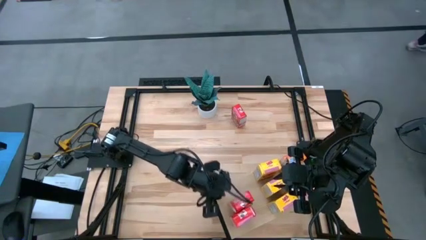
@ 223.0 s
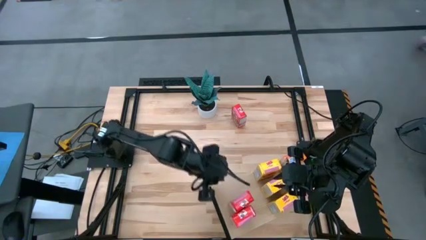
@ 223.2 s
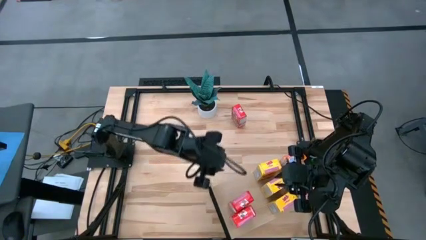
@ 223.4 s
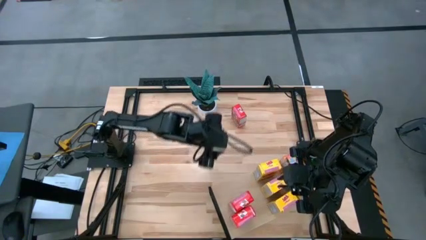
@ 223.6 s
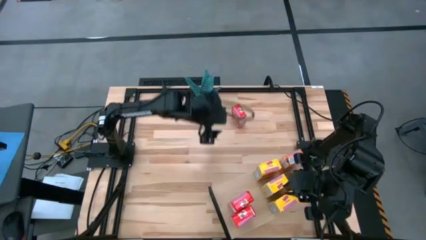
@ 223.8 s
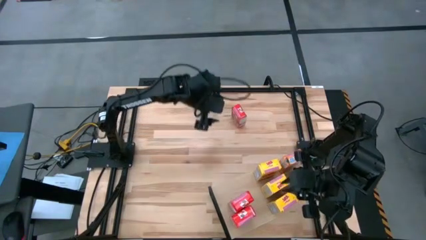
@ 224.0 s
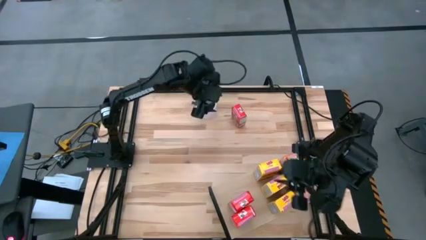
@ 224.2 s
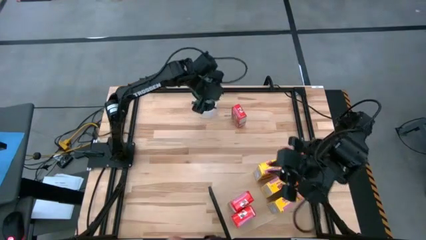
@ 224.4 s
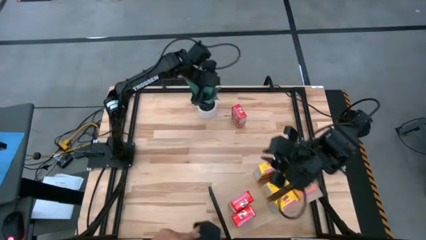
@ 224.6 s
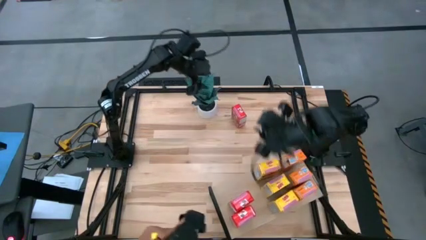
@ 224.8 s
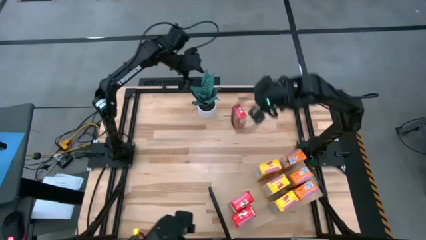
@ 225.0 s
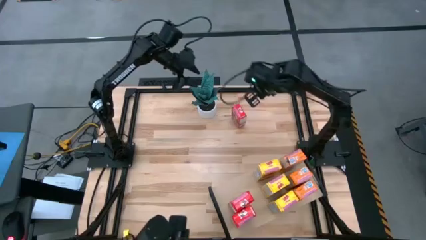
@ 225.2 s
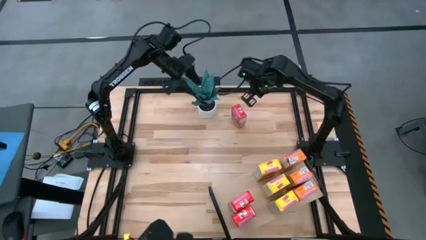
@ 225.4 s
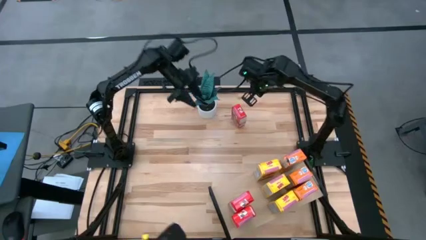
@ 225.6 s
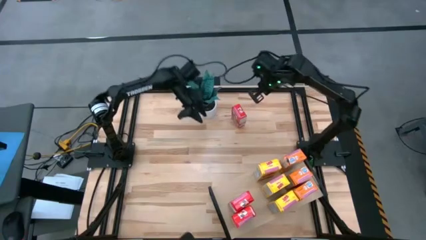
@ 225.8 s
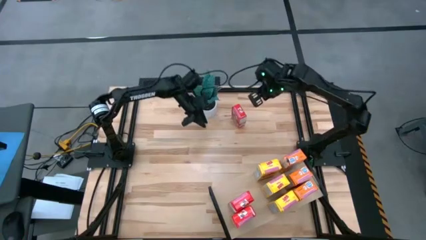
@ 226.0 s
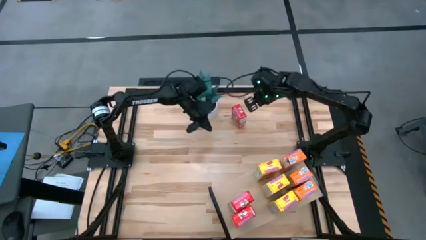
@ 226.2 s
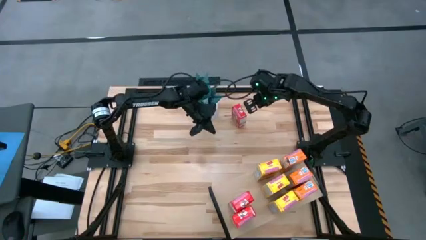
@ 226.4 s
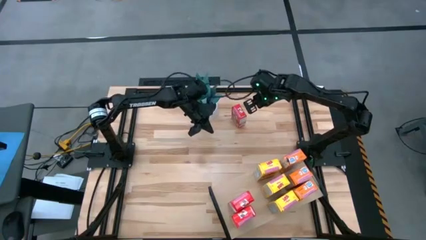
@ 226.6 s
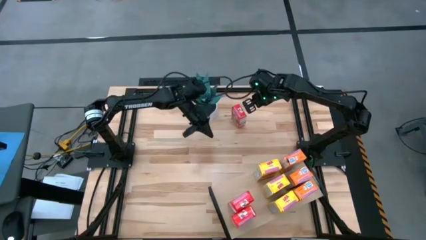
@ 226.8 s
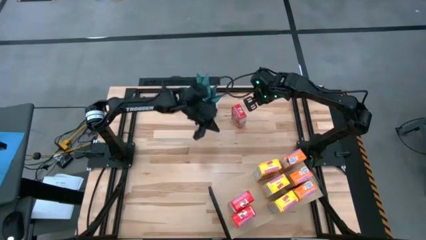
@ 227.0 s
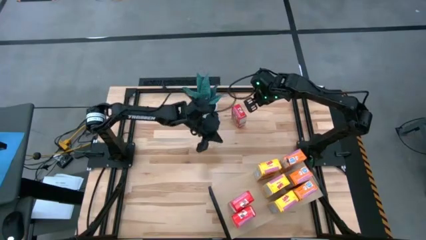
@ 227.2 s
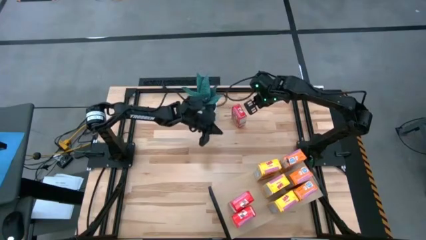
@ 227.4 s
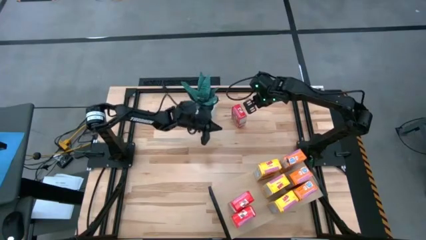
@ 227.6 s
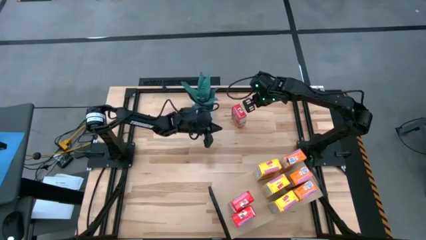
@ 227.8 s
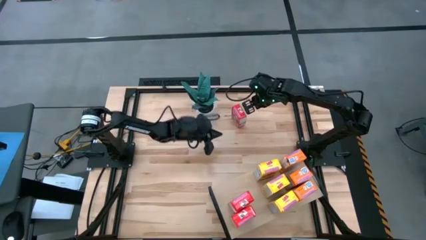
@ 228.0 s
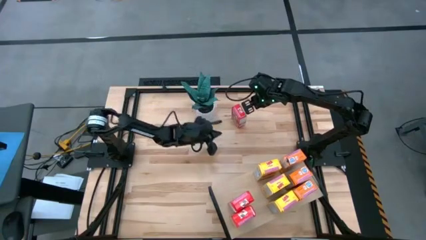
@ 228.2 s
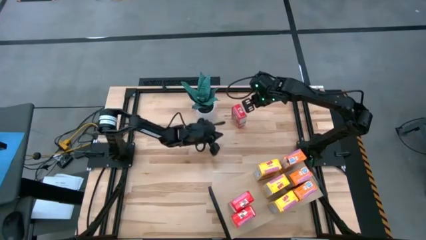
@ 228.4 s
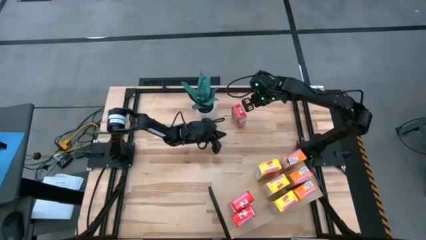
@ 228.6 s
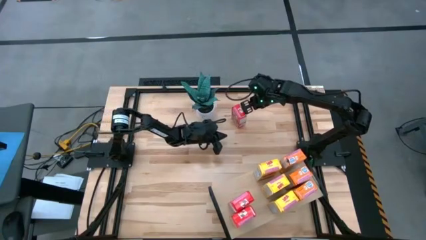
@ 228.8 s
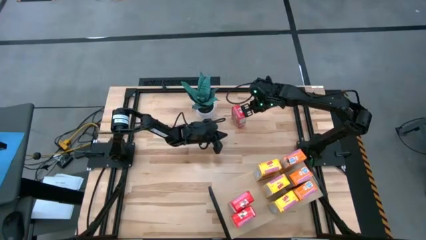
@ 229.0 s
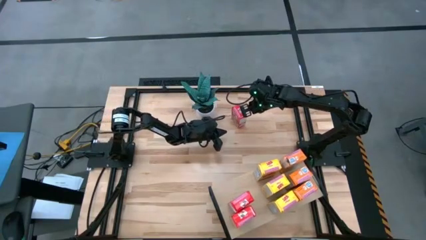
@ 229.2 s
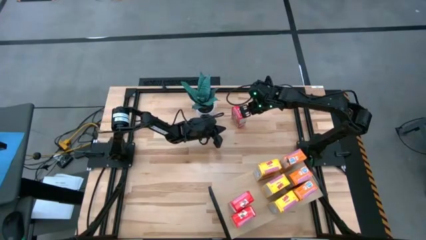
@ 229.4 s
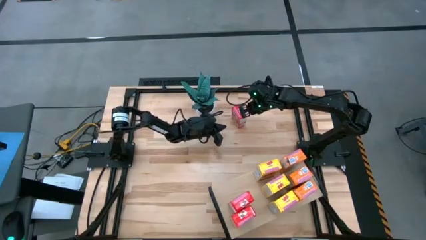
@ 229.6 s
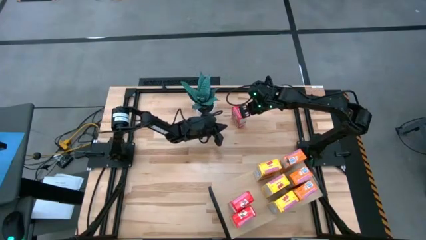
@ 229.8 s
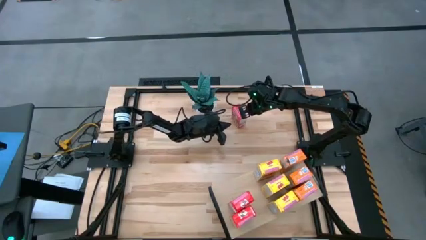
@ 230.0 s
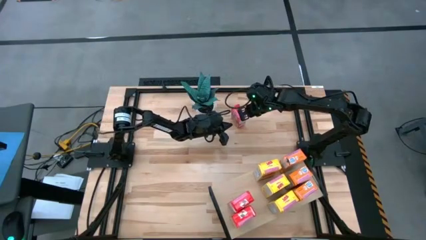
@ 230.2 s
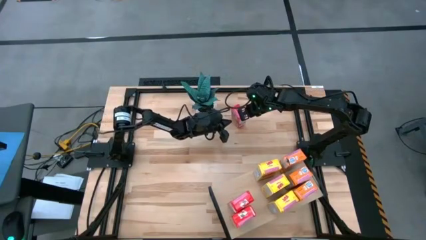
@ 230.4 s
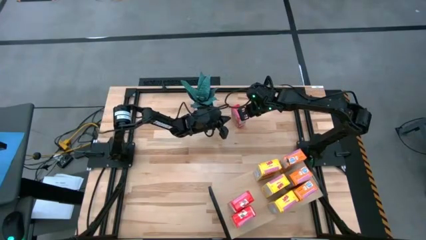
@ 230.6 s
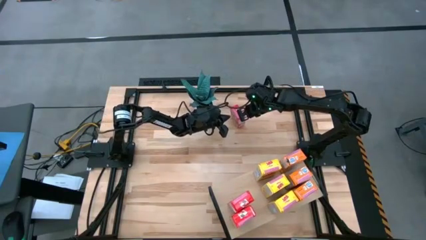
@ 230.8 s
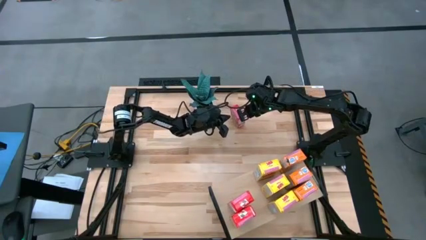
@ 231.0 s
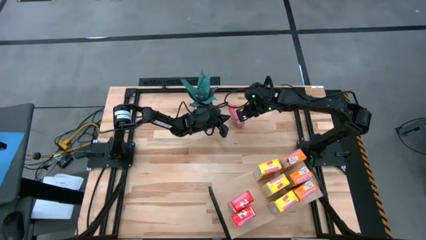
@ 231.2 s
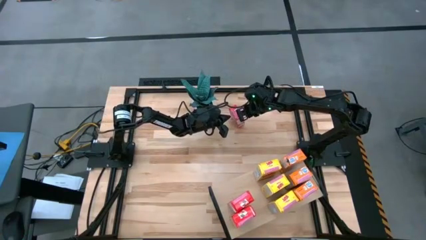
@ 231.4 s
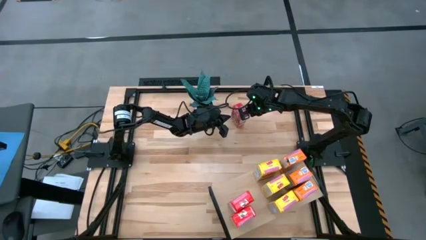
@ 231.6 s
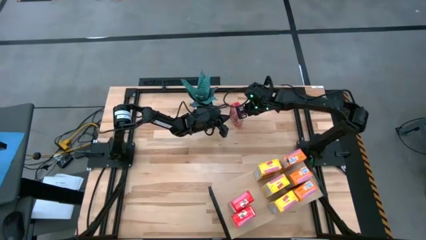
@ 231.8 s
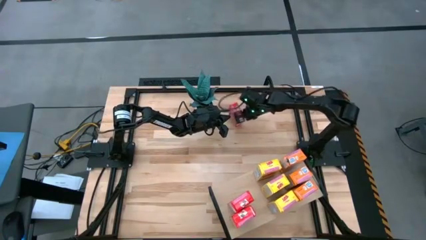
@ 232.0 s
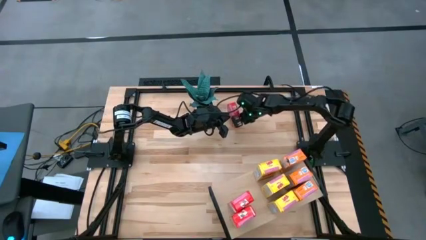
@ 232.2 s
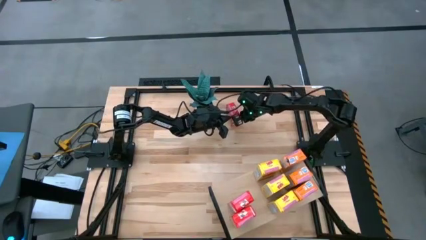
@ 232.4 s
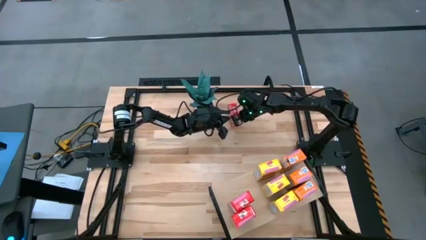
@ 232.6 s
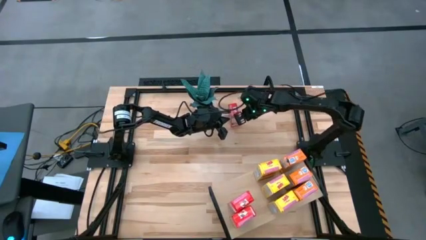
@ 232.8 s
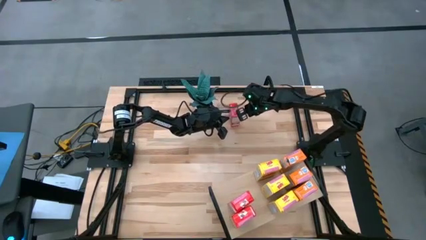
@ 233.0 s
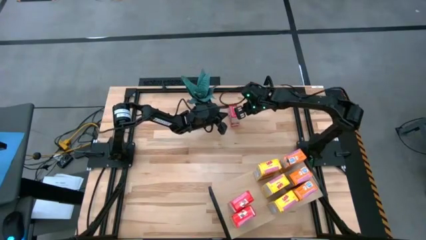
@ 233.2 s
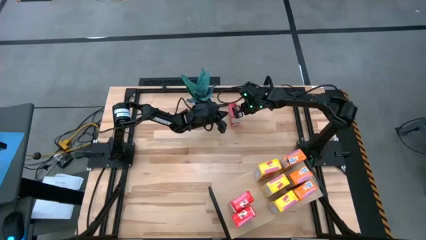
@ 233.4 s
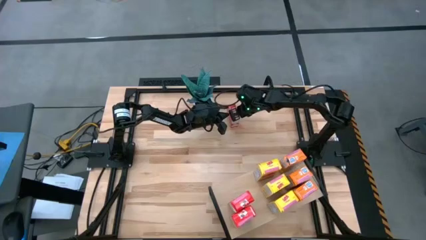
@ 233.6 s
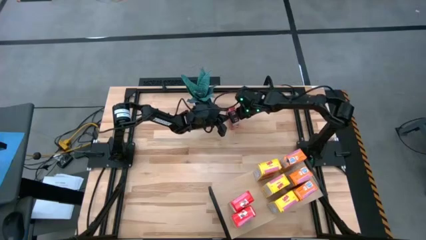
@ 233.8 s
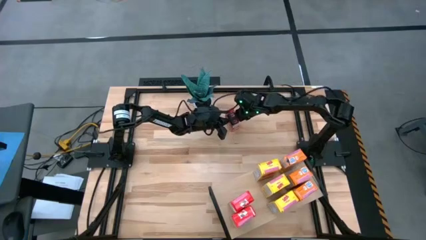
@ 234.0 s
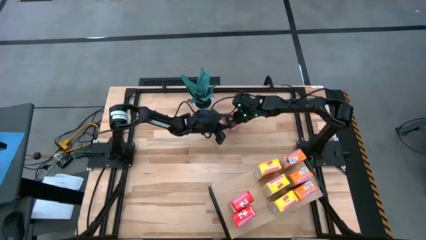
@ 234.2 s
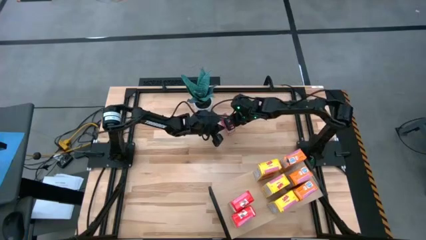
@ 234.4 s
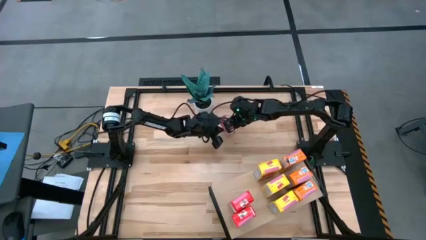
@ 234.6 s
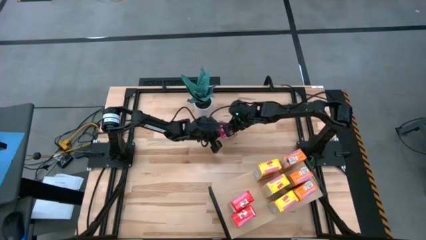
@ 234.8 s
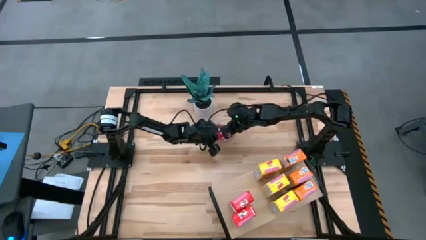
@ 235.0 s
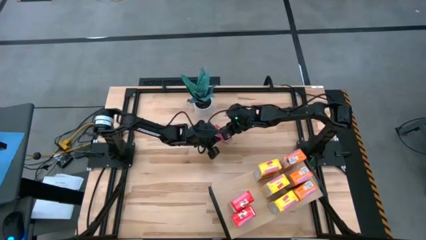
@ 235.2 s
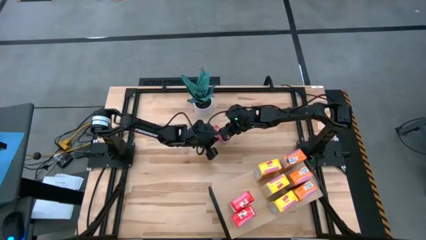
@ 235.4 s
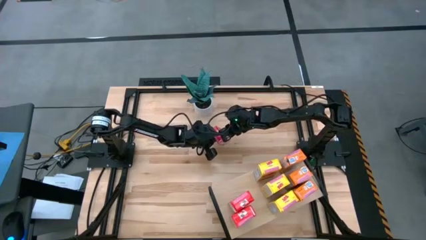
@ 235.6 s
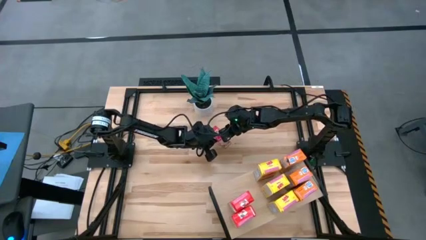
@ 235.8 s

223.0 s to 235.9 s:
Task: Stack cereal on shelf
Put the red cereal box on the shelf aligned with the other red cereal boxes
